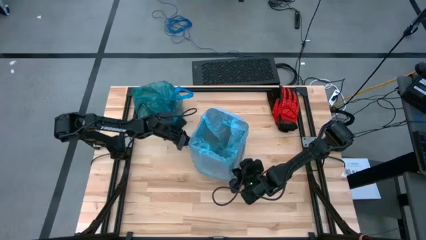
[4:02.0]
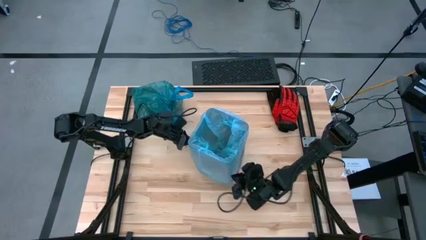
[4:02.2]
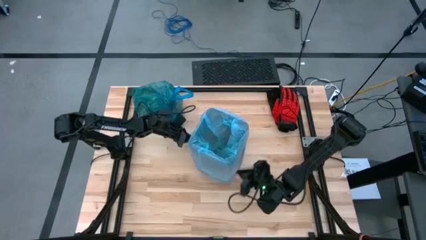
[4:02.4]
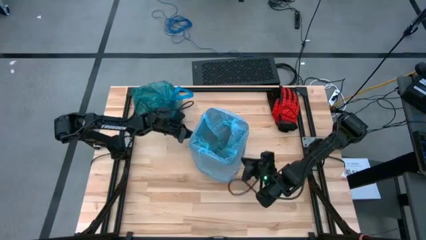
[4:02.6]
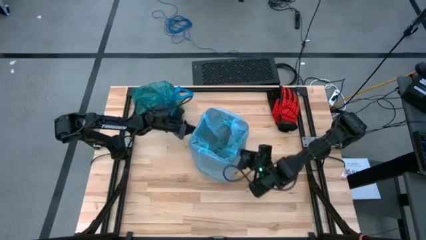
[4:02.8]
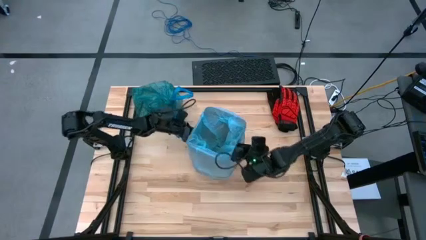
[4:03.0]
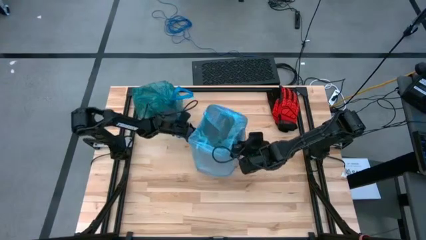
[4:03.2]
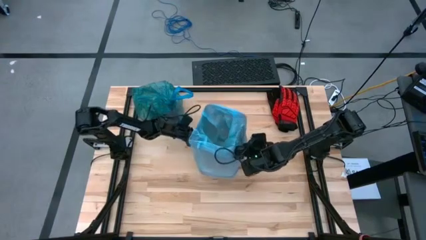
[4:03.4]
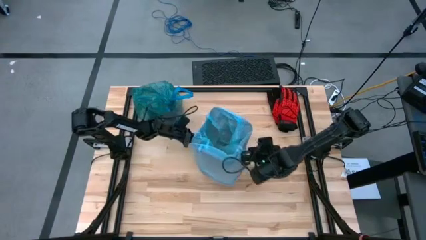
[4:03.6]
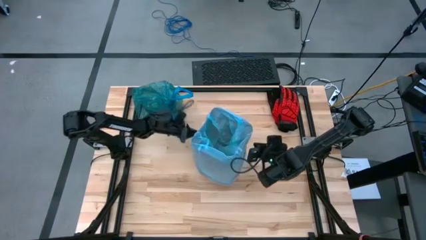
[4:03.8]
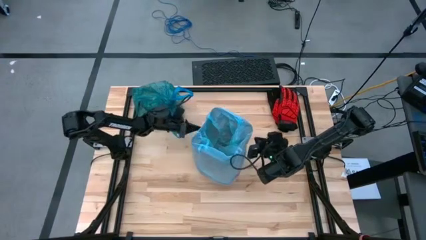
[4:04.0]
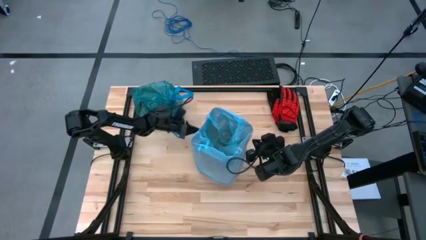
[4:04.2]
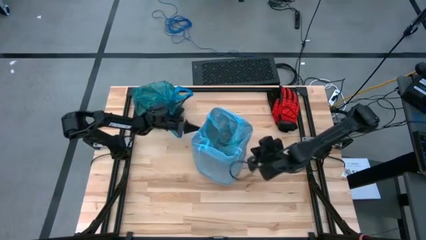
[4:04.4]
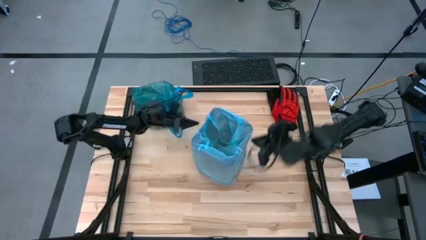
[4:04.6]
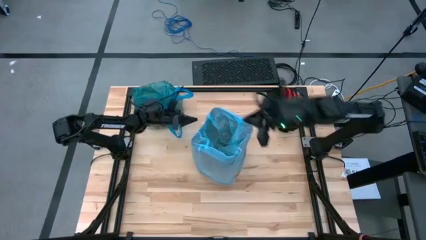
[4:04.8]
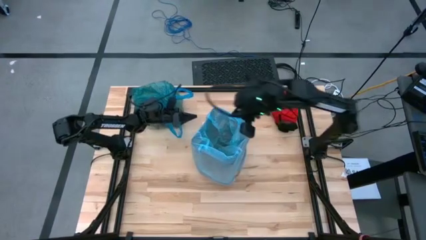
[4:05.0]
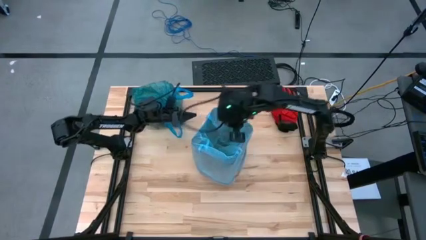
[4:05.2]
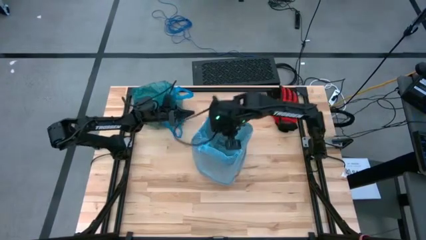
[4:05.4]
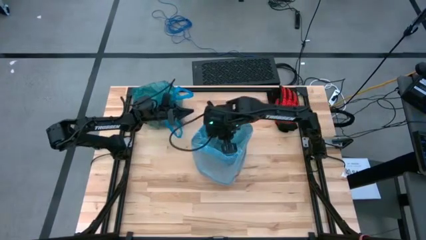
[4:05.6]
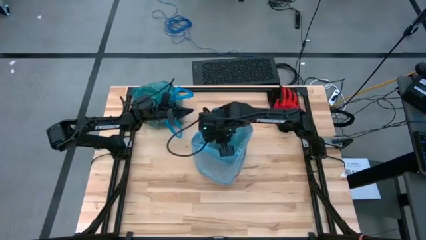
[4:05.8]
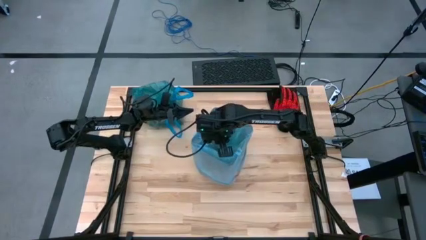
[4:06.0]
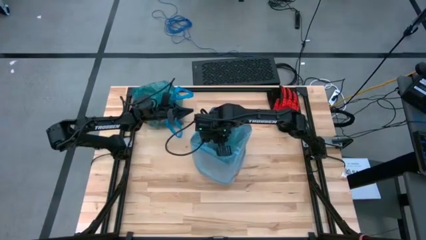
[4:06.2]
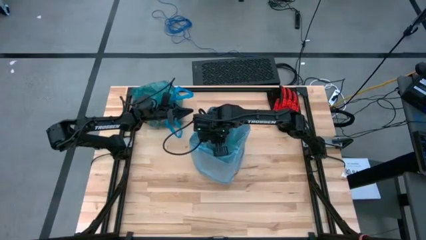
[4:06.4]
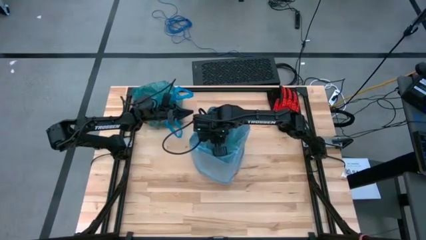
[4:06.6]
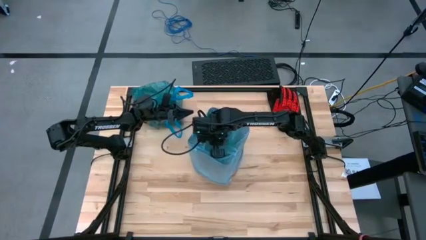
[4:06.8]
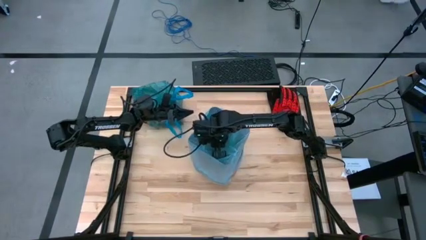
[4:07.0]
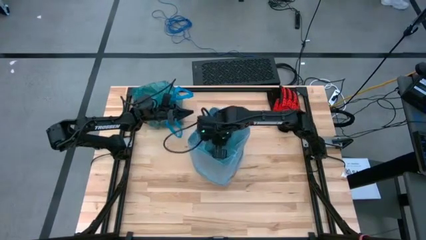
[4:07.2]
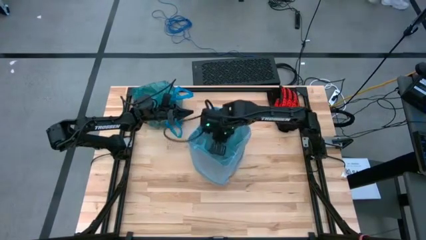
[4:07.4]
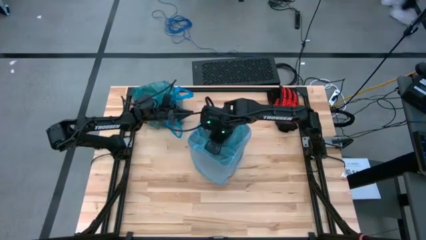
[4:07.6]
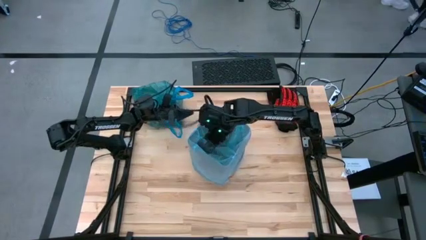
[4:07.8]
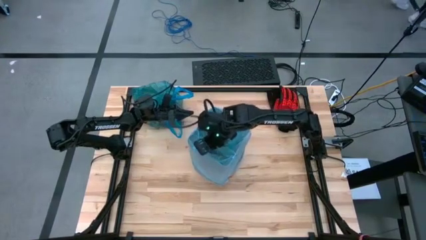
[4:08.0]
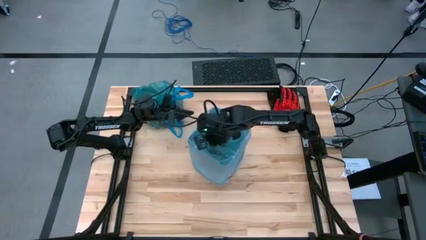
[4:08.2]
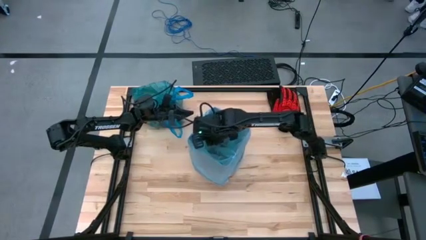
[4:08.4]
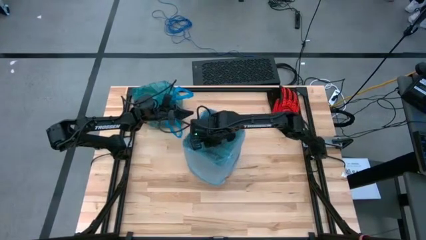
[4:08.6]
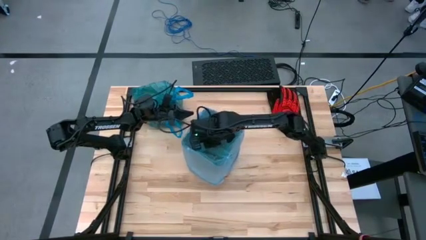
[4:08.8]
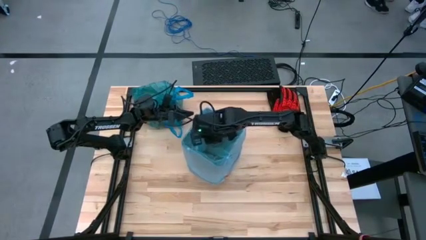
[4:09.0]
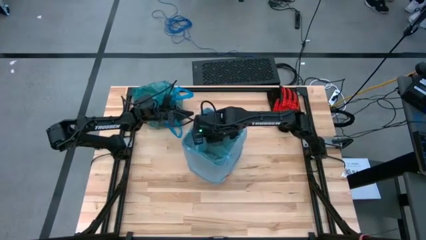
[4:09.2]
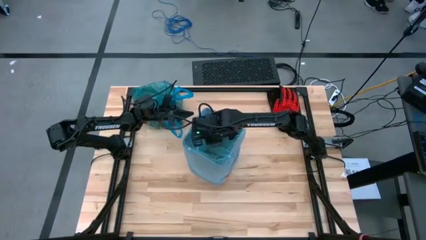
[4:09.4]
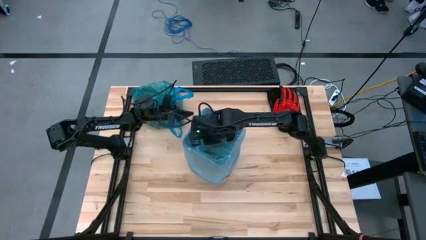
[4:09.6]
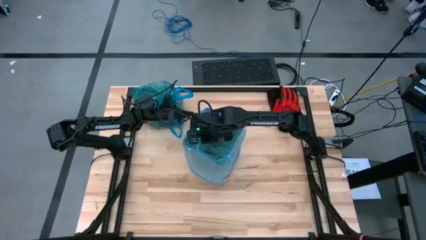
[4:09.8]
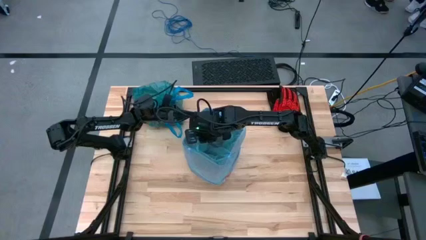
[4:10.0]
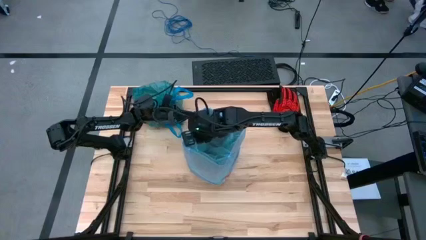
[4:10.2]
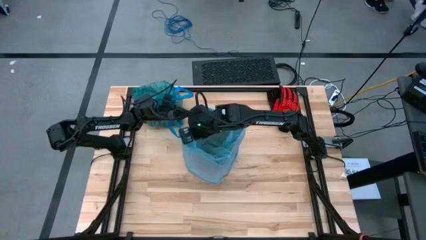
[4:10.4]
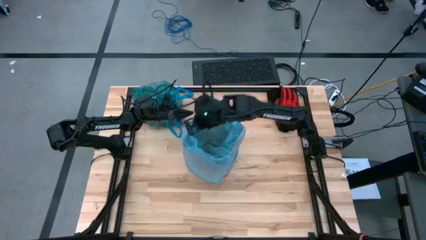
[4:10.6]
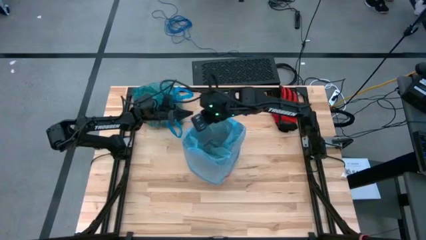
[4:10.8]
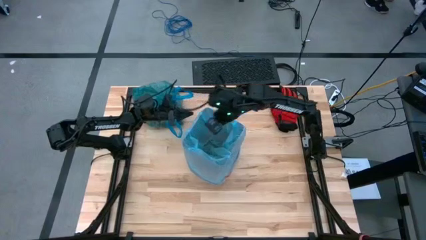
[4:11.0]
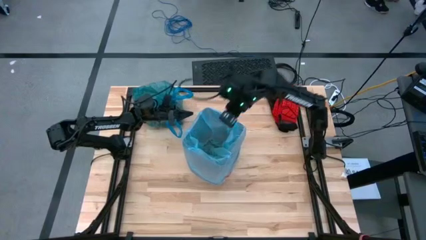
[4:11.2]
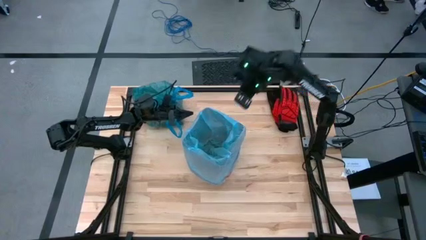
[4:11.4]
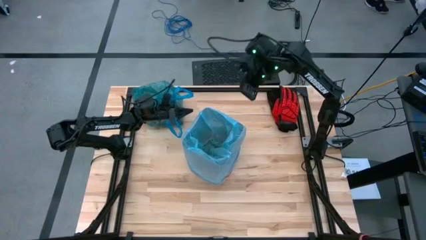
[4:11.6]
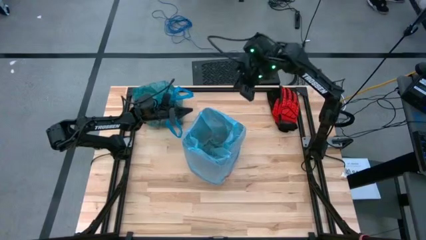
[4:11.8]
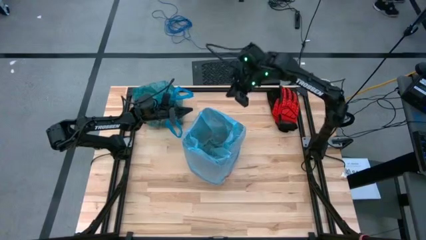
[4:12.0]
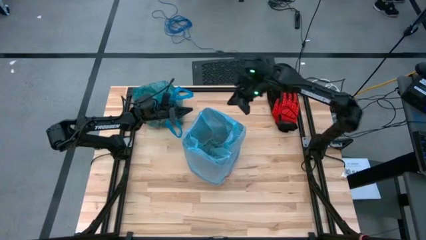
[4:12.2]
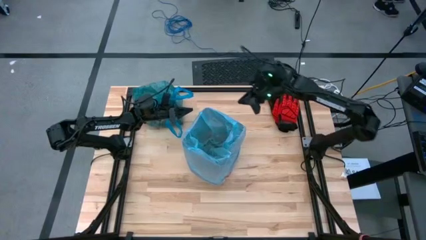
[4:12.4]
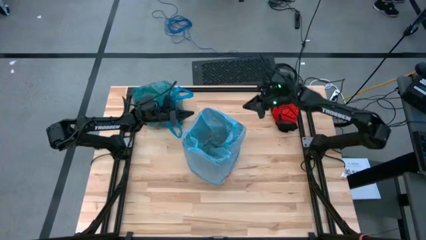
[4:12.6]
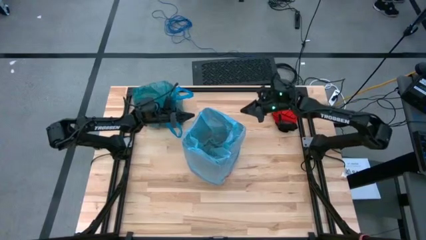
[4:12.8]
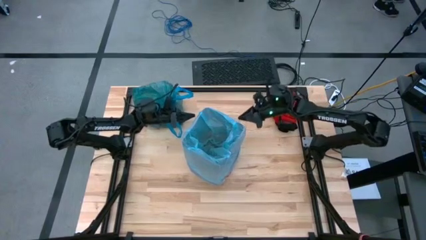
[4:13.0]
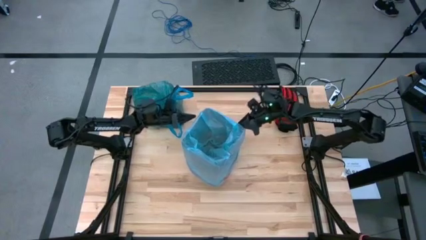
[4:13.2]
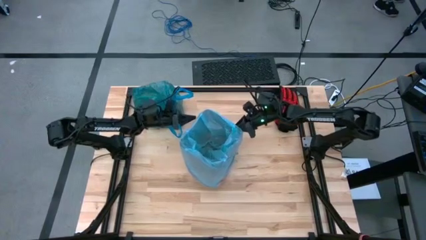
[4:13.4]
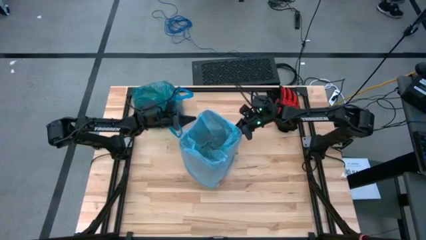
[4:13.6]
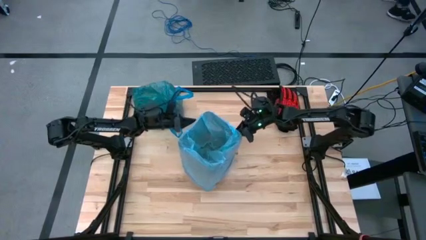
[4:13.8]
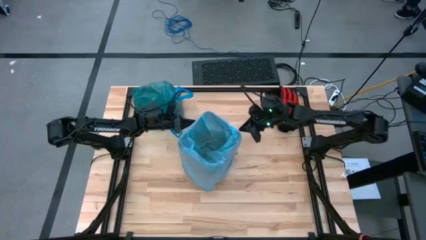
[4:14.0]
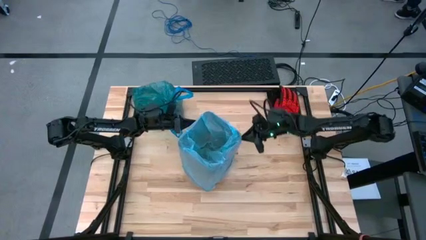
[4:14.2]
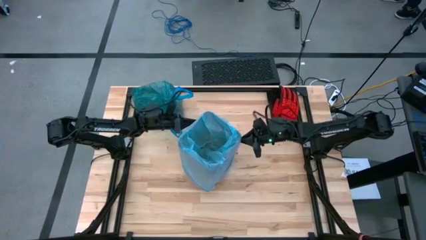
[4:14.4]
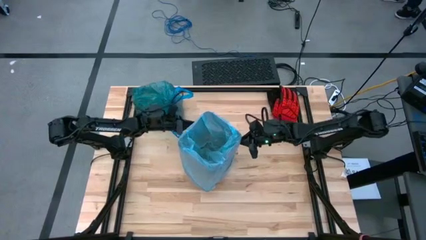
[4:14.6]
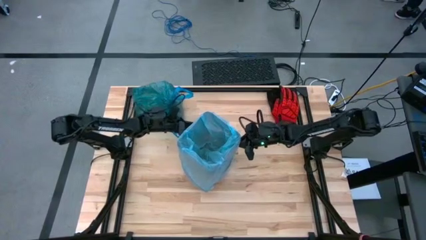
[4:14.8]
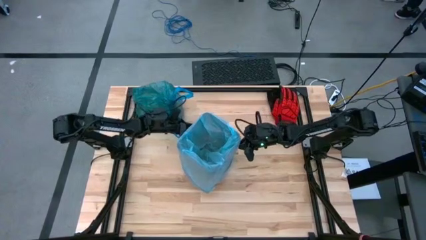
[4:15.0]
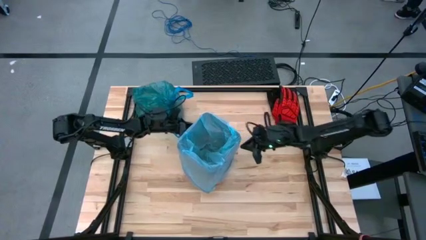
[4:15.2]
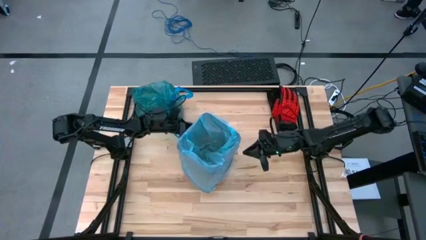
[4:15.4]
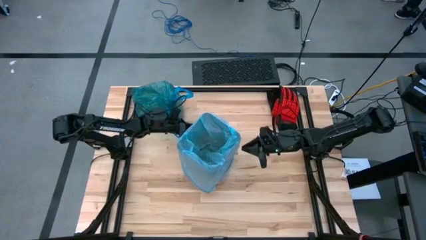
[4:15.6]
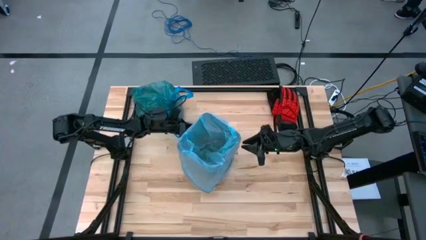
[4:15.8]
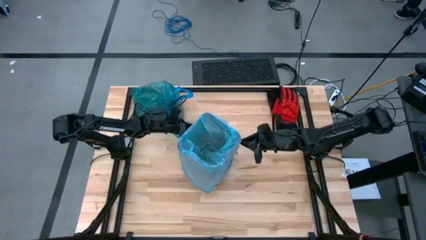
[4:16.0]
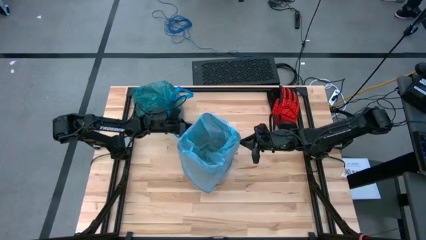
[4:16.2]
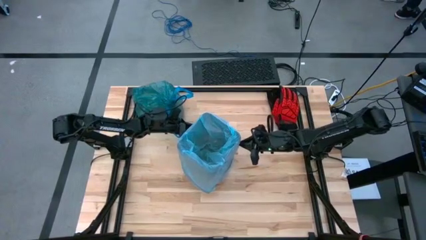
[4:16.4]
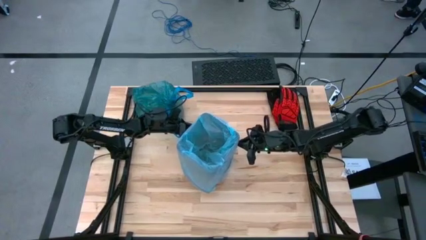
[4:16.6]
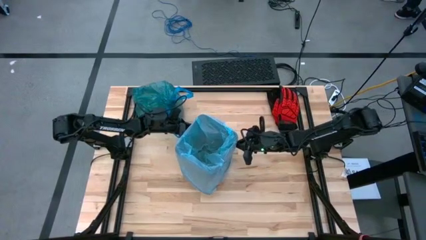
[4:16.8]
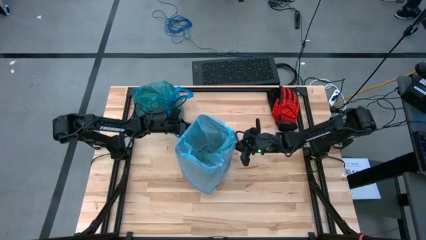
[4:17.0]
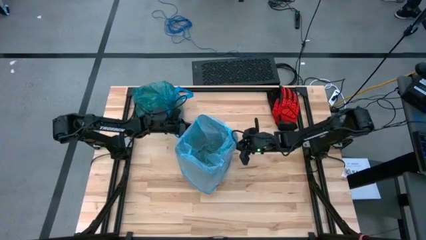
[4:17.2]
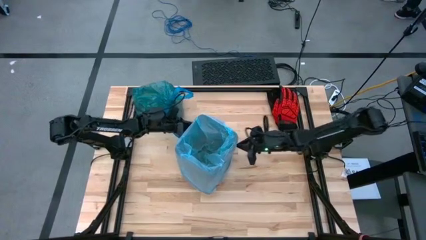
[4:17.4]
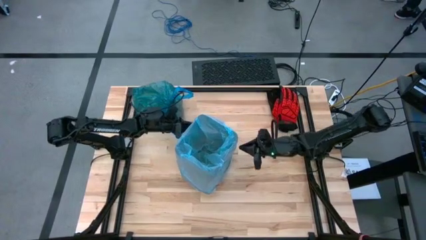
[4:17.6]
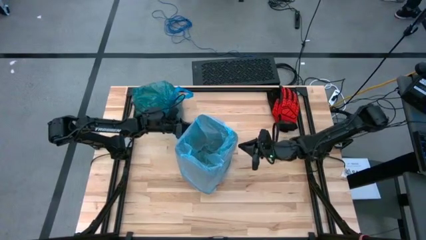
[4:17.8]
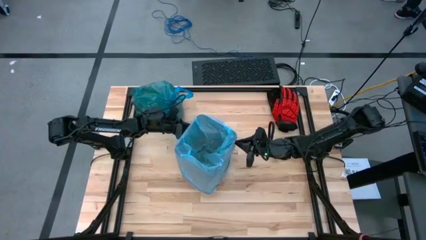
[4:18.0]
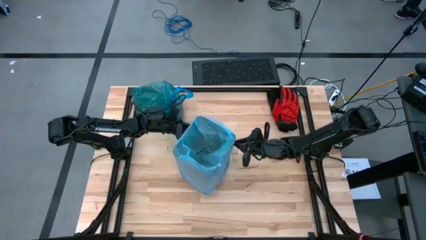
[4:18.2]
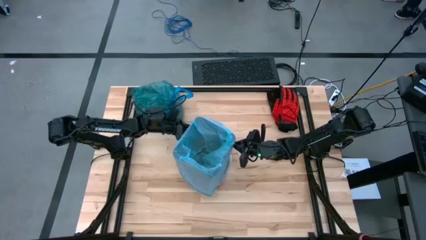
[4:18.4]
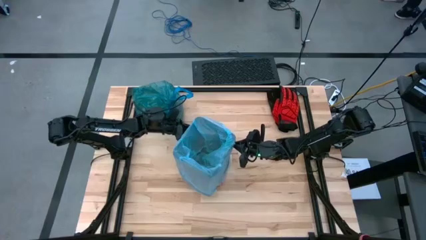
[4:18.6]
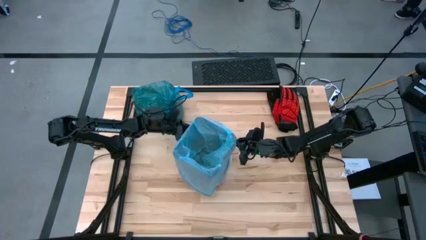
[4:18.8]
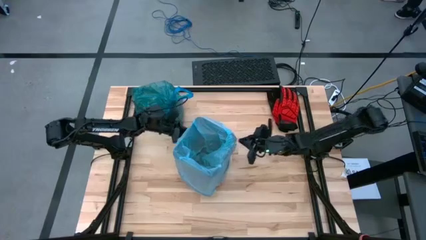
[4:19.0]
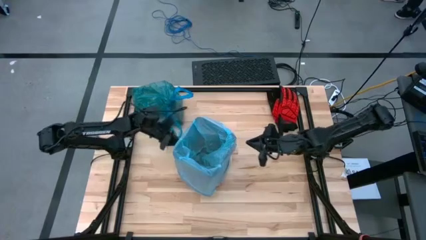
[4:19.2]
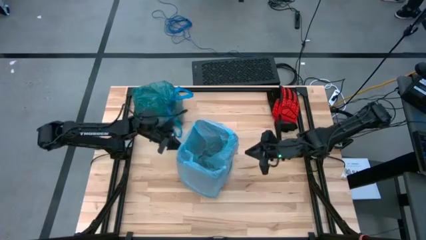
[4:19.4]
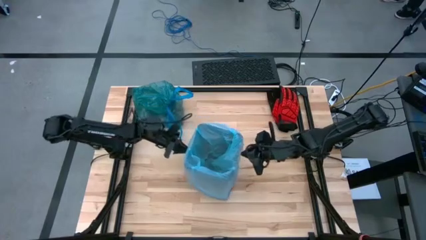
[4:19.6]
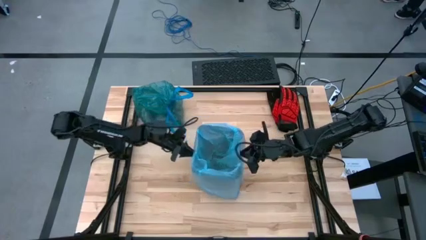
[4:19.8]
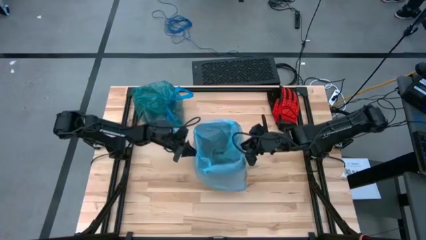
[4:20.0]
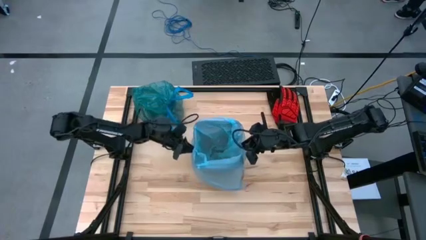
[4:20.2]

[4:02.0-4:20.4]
Task: place trash/remove bag and relplace
Insert the new blue trash bag into the trash bin
